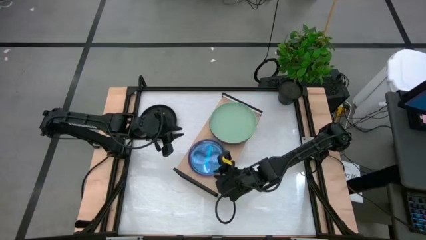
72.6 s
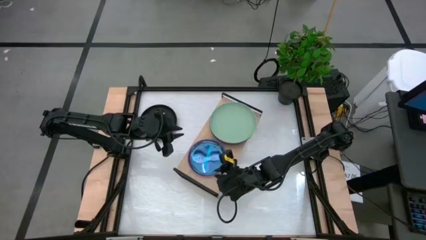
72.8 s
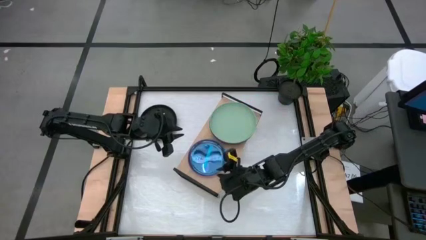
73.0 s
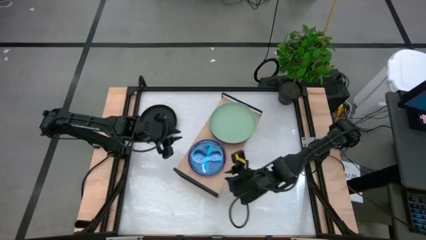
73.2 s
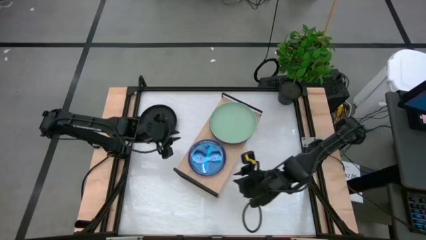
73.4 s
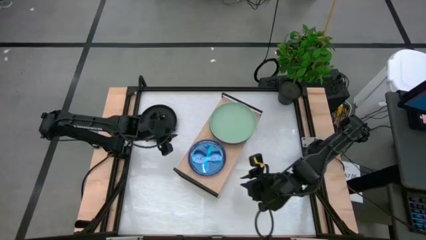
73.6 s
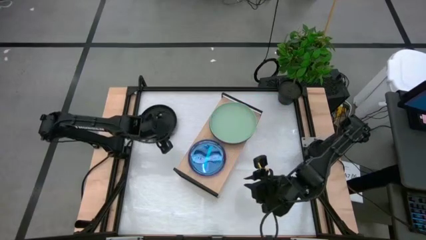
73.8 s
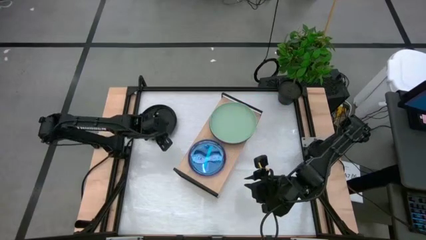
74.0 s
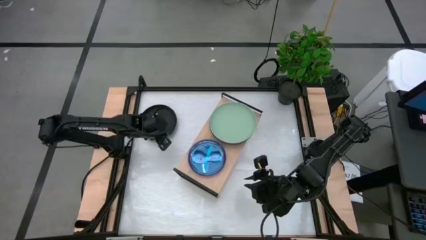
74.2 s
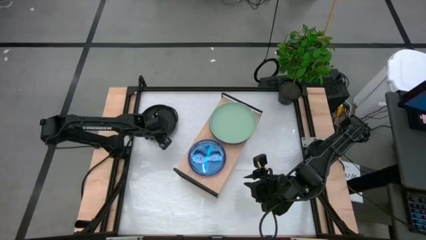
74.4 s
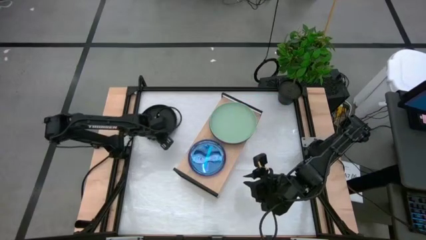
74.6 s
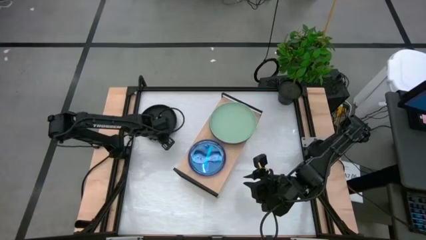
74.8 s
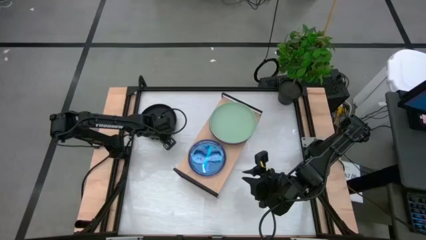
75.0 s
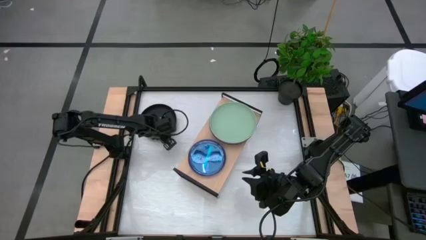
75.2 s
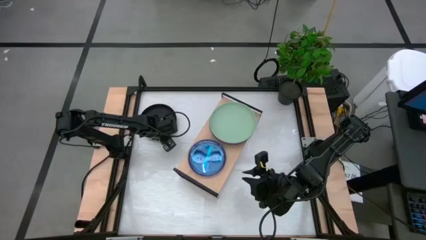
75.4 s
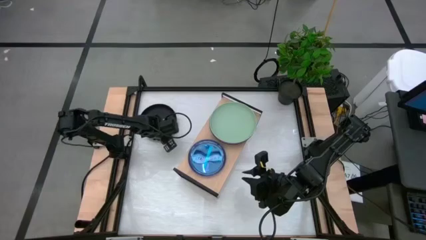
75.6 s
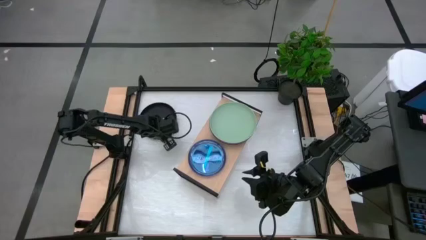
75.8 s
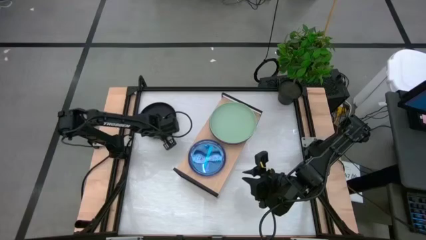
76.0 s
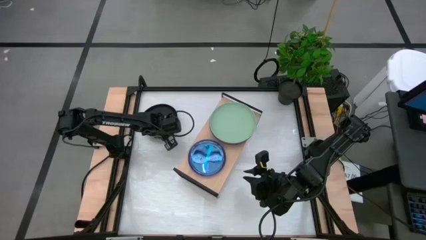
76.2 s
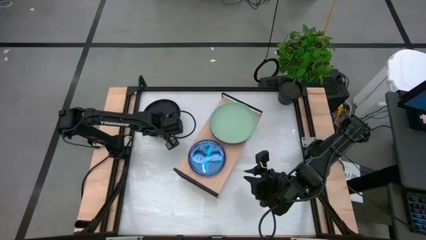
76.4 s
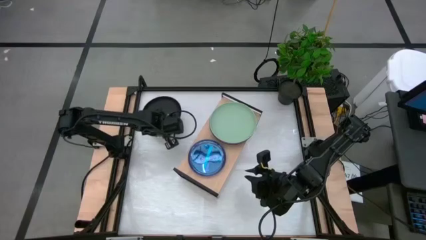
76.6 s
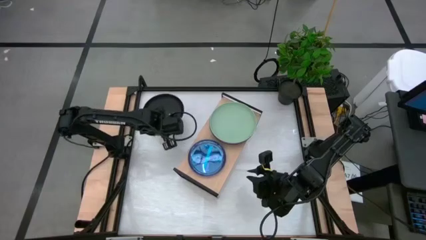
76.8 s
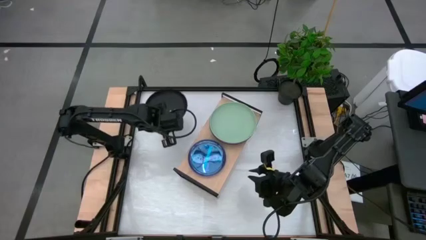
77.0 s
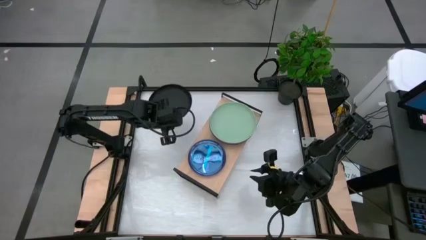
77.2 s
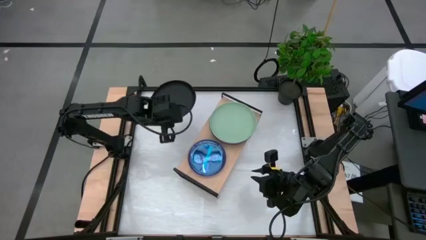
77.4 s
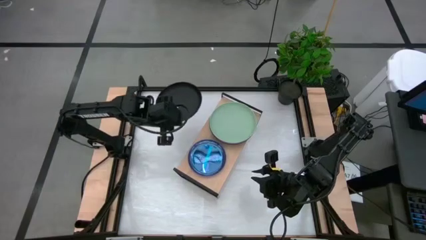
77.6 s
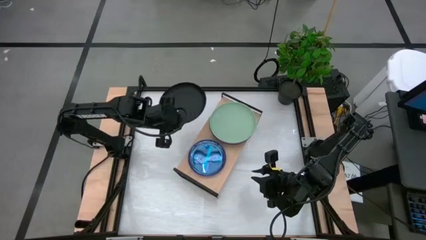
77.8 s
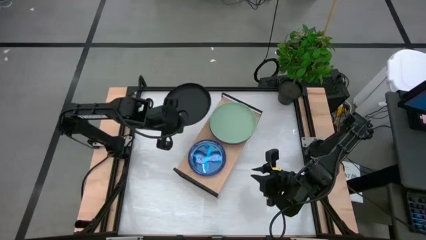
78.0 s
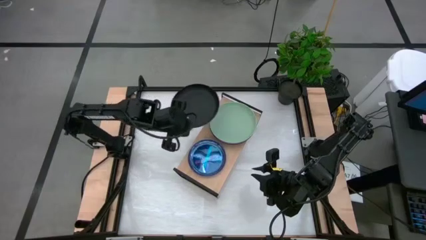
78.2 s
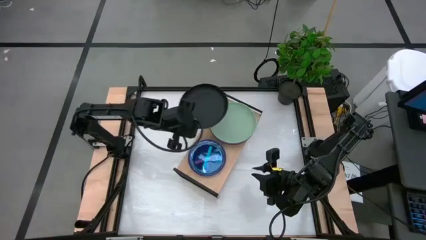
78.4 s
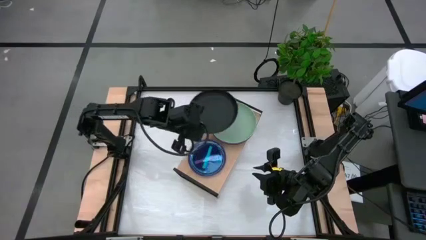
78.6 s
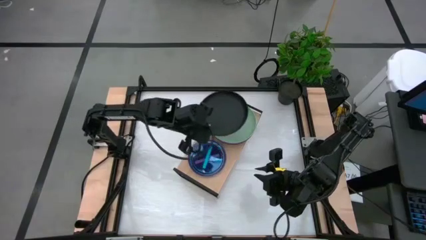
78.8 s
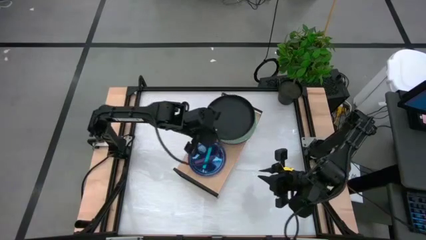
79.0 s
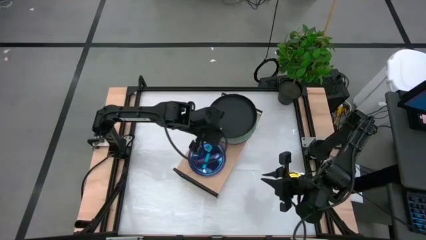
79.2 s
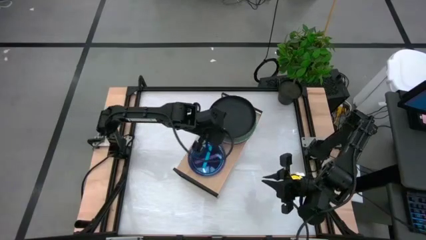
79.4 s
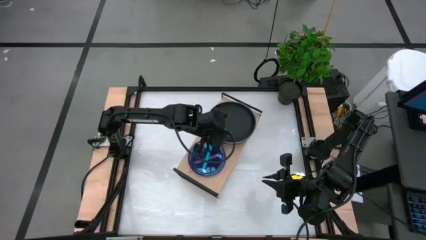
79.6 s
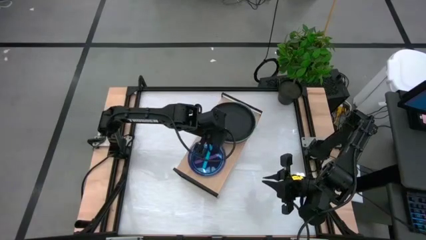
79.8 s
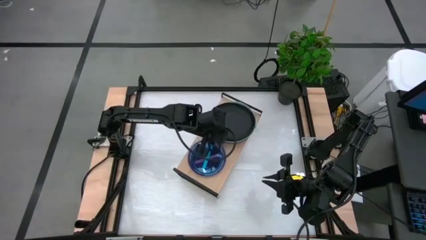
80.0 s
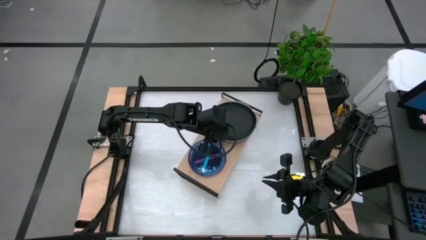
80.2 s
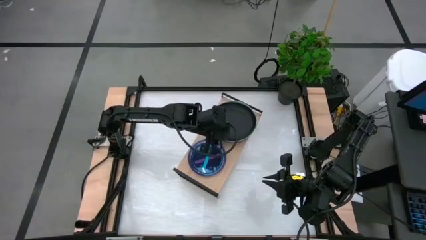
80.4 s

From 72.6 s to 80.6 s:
Task: Place and stack plates onto a shelf
Stack the big black plate on top of the big green plate

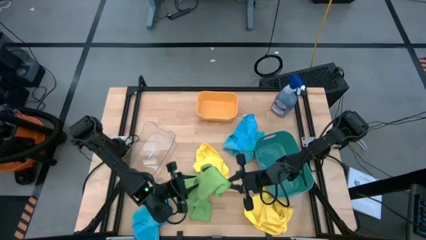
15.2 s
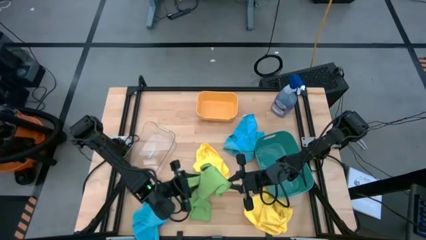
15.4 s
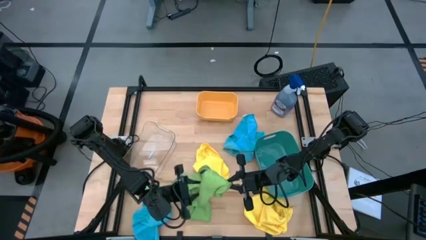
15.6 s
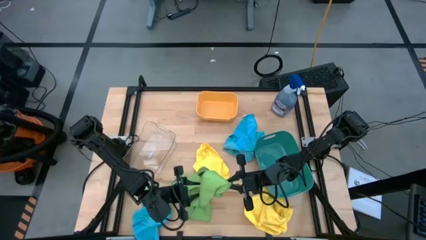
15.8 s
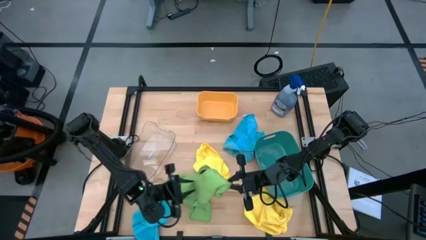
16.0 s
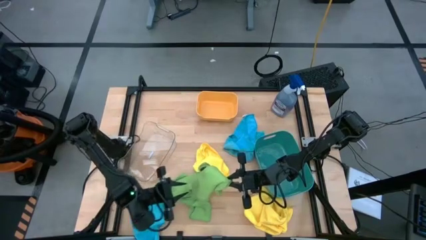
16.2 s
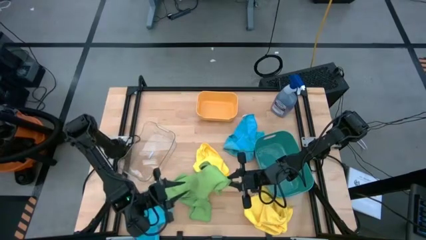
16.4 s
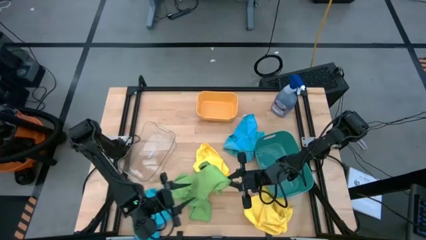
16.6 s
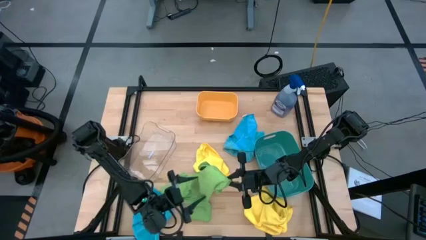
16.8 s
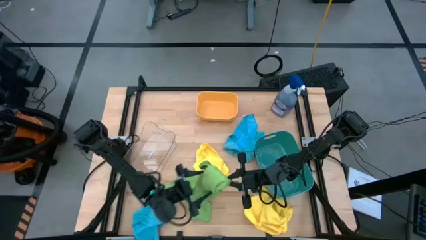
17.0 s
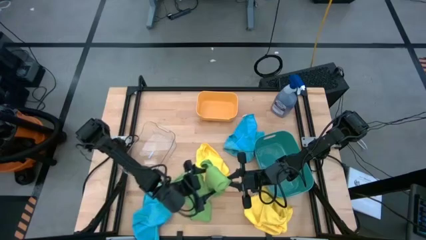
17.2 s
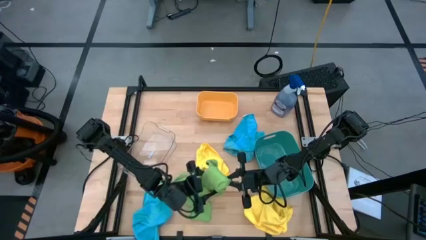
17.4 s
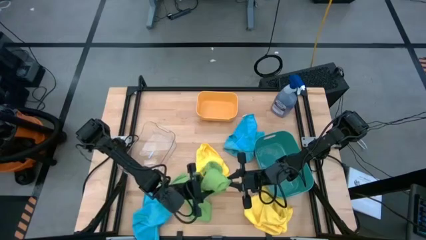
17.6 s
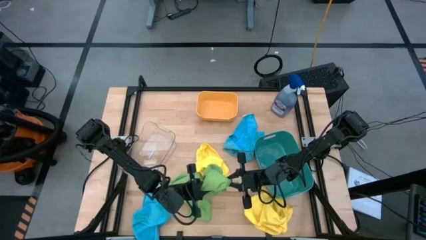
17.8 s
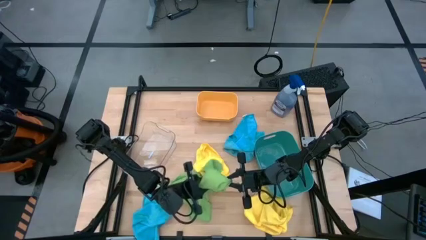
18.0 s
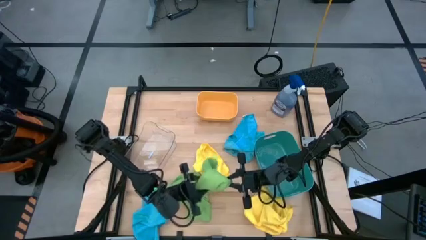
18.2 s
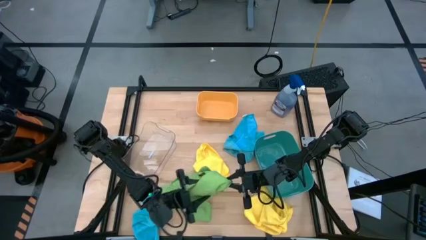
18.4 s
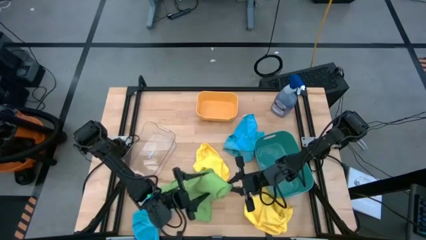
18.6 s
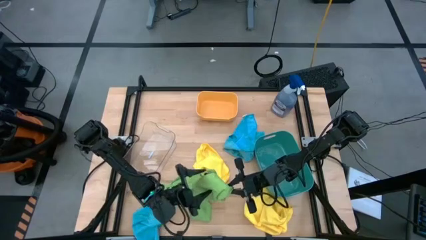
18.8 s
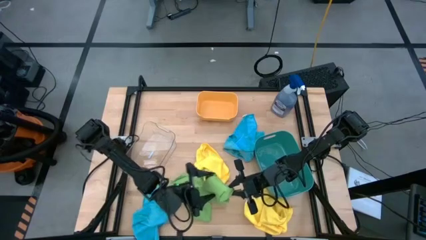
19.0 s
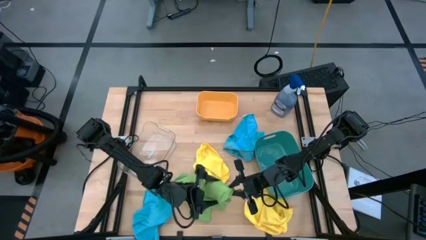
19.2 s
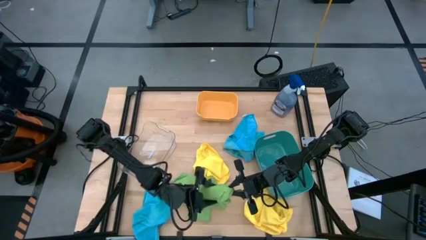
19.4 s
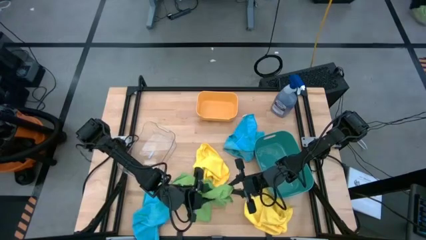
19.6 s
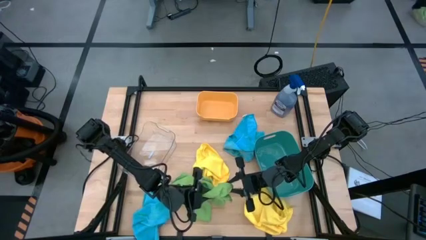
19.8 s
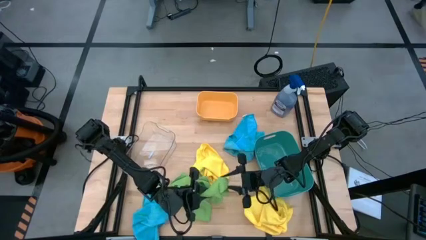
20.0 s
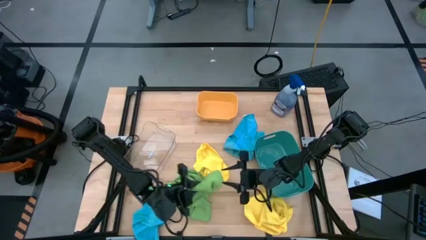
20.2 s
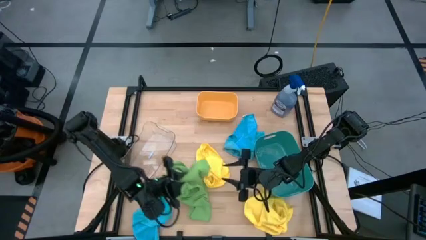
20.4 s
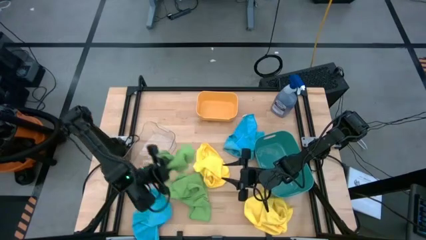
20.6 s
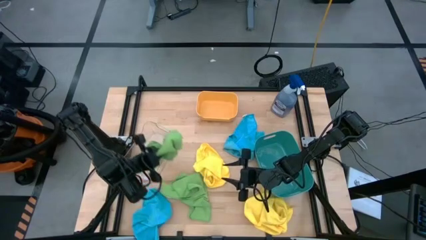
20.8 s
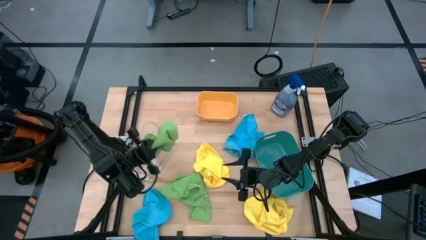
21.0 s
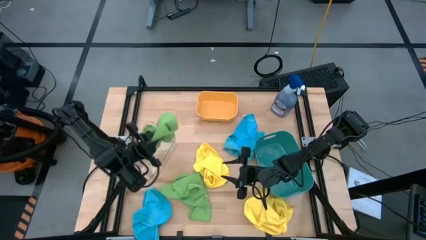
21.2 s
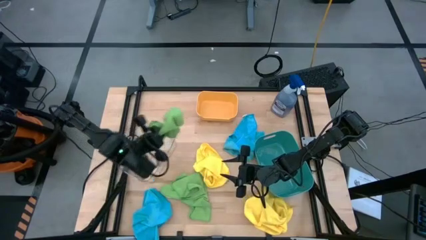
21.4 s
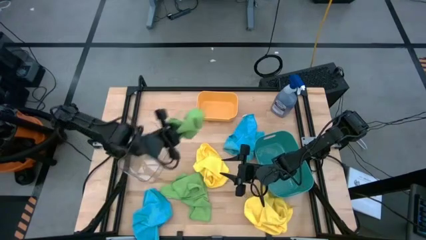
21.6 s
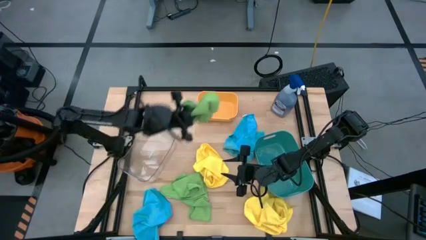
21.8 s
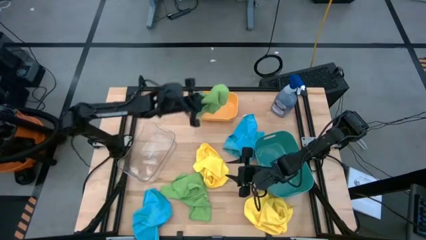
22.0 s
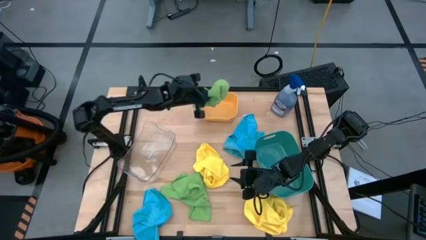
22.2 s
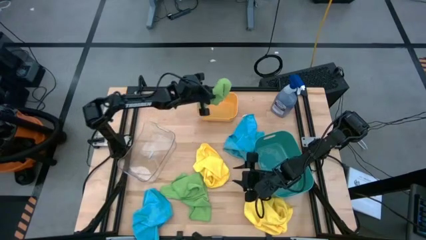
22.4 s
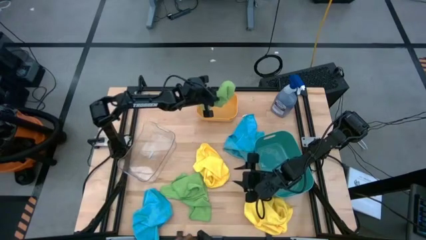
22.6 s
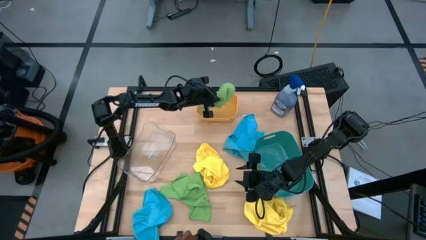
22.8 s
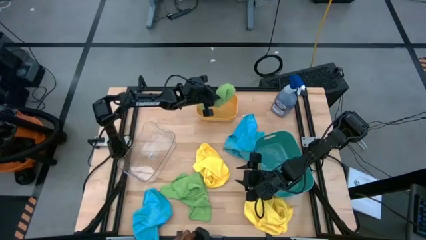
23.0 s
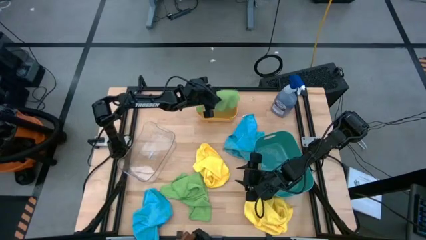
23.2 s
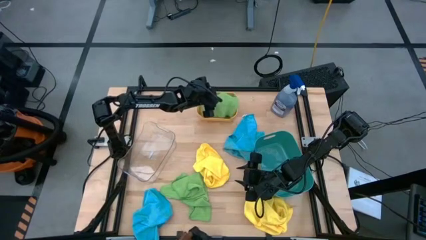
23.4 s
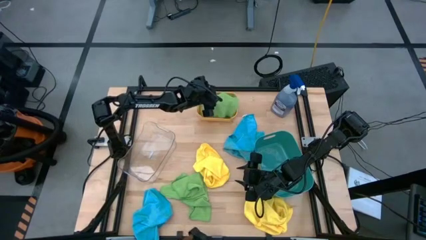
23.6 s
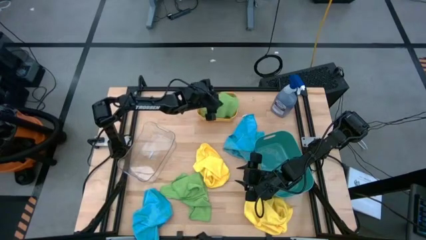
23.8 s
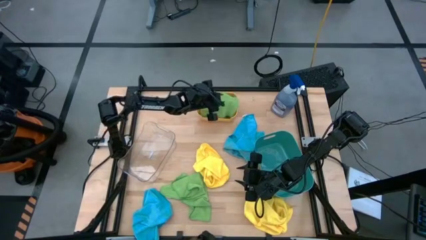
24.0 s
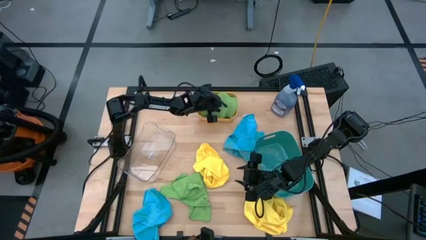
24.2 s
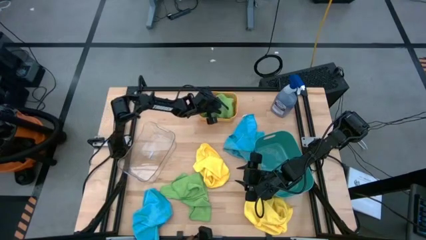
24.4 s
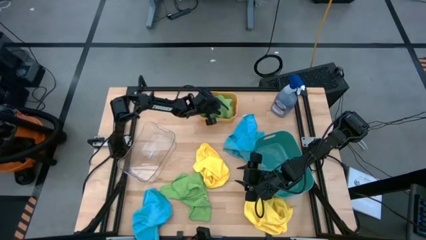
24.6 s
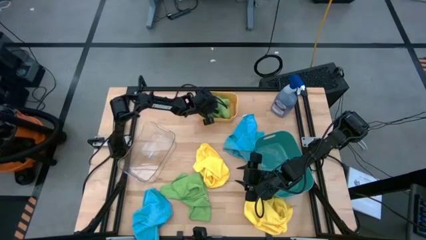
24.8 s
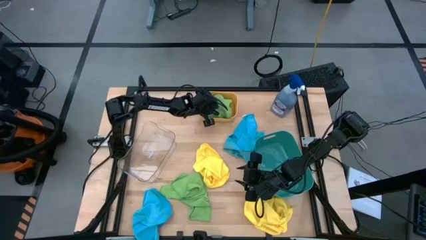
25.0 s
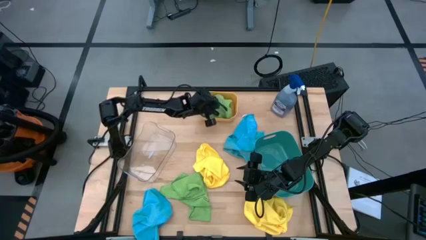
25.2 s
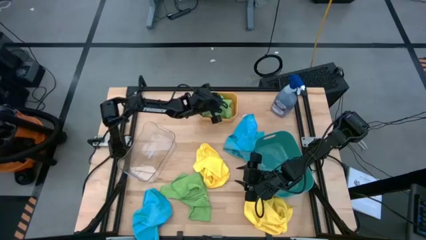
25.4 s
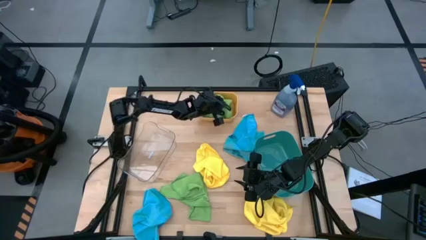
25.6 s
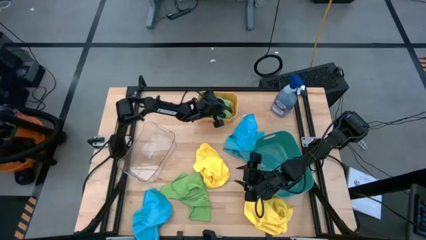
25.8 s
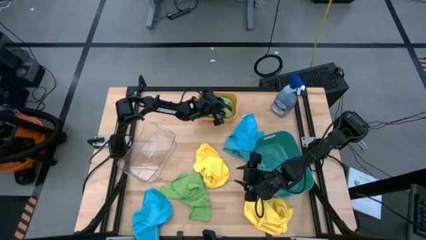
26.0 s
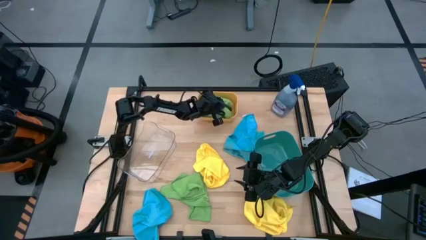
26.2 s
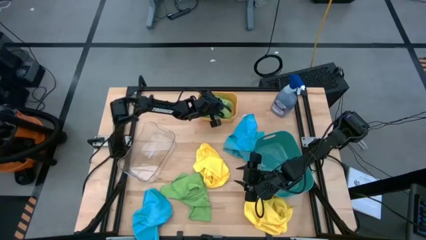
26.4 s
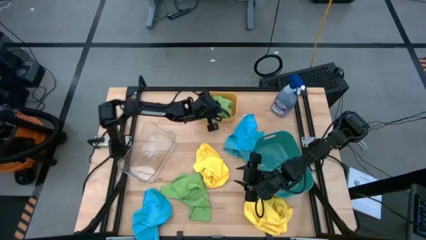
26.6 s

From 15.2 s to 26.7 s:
Task: Sort microfiber towel by color & place in baskets
Put the top green microfiber cloth into the orange bin
